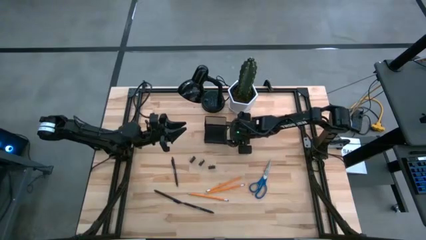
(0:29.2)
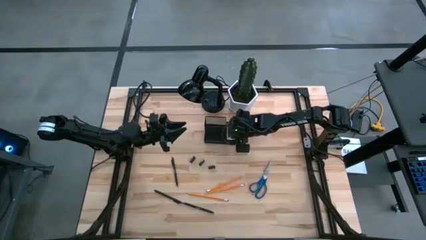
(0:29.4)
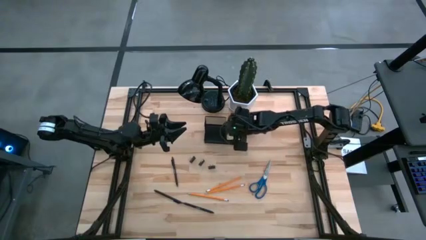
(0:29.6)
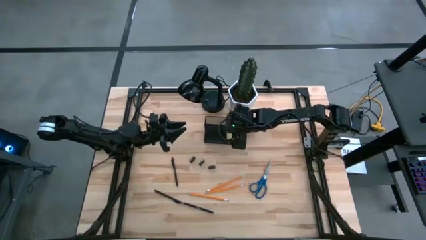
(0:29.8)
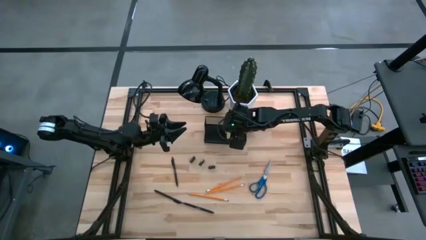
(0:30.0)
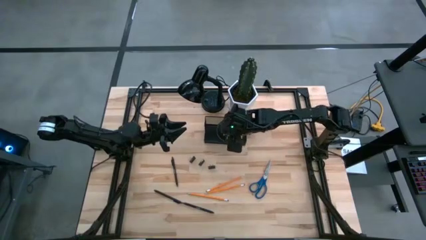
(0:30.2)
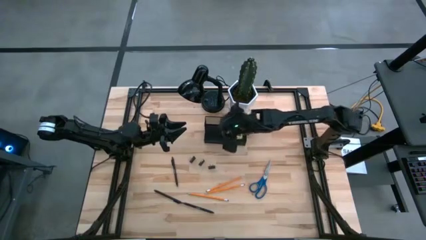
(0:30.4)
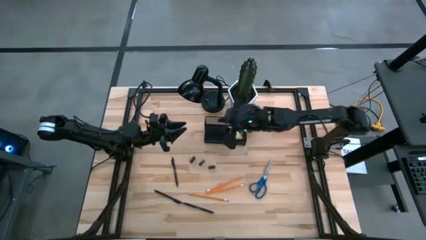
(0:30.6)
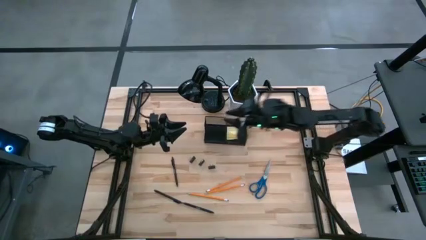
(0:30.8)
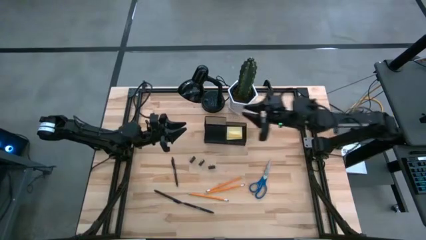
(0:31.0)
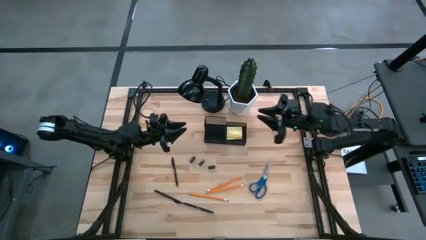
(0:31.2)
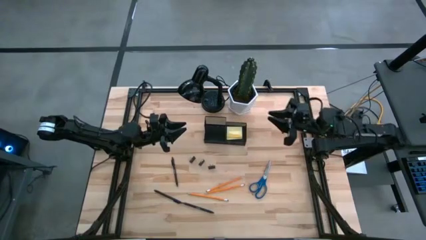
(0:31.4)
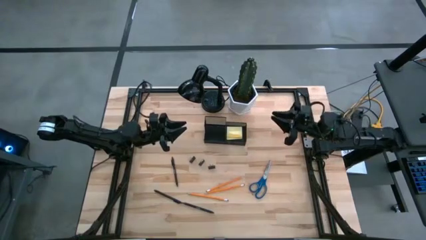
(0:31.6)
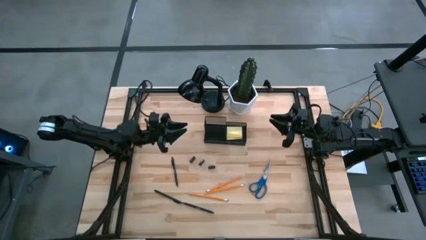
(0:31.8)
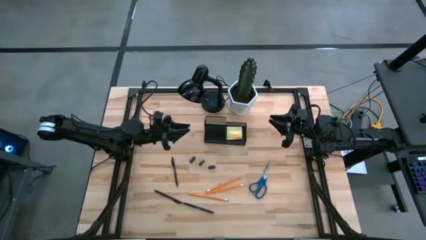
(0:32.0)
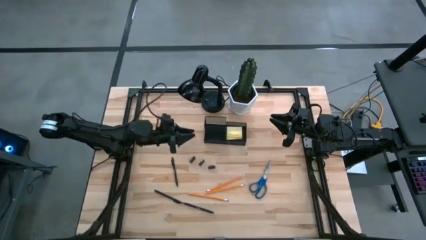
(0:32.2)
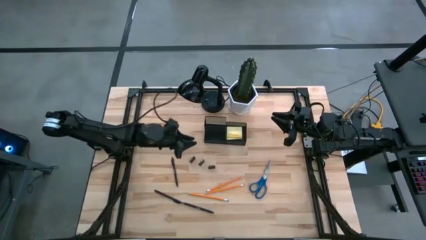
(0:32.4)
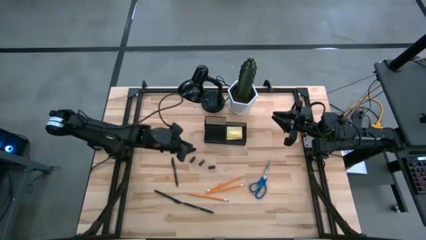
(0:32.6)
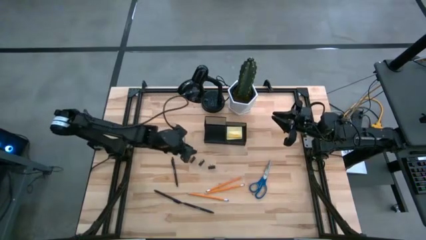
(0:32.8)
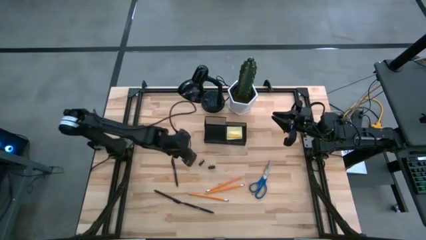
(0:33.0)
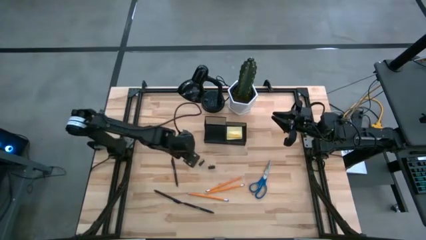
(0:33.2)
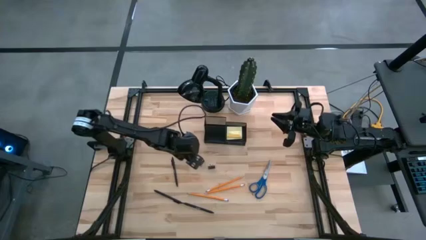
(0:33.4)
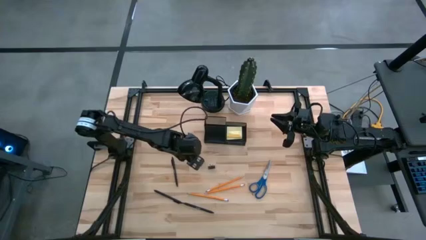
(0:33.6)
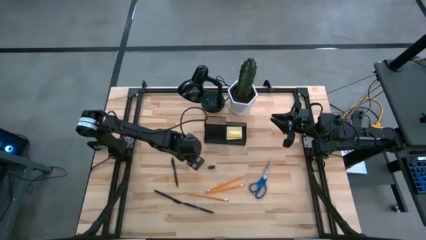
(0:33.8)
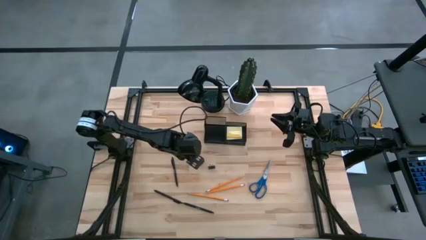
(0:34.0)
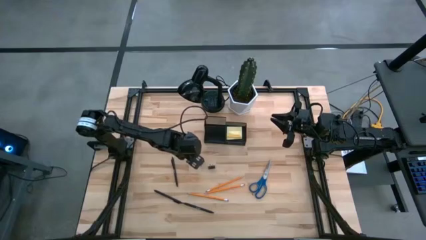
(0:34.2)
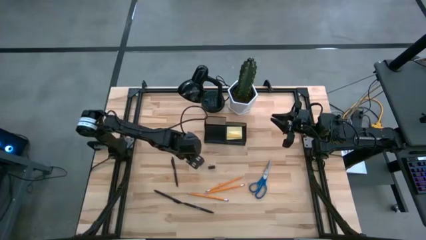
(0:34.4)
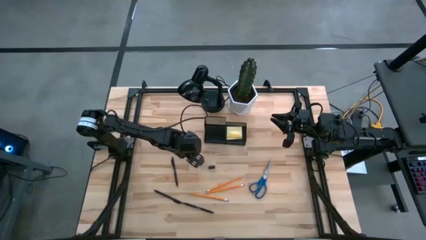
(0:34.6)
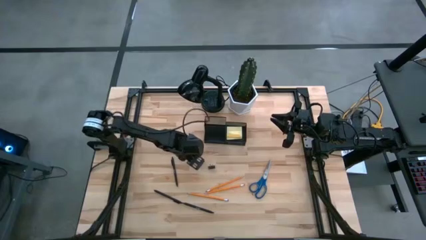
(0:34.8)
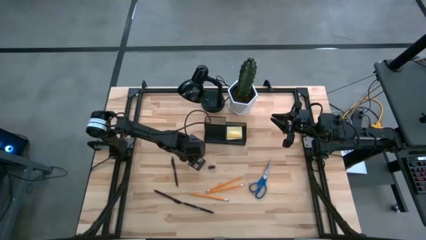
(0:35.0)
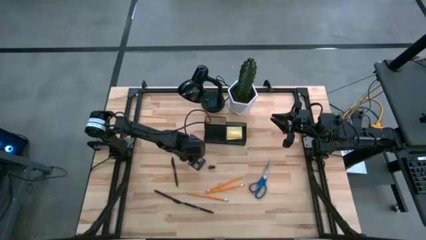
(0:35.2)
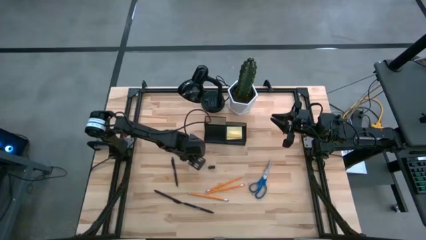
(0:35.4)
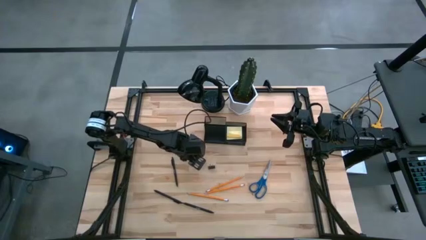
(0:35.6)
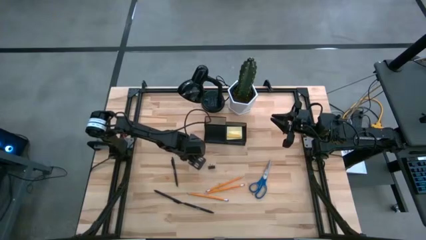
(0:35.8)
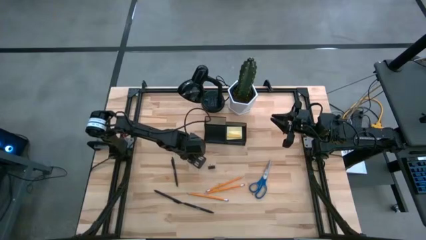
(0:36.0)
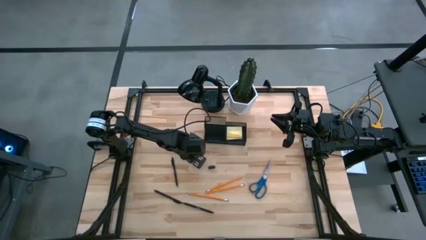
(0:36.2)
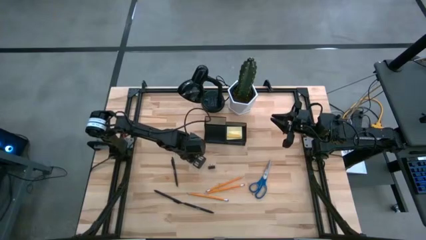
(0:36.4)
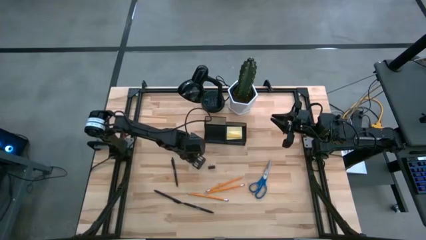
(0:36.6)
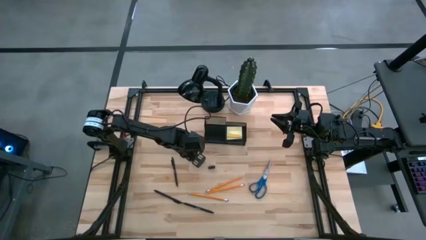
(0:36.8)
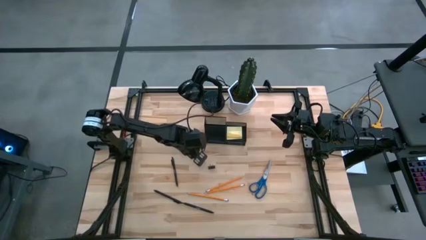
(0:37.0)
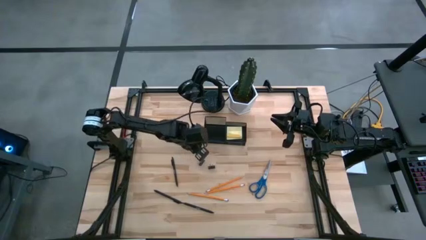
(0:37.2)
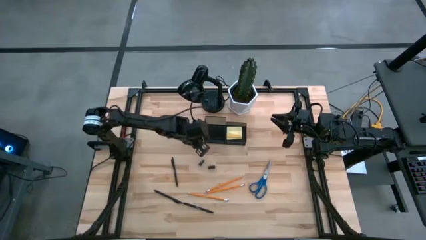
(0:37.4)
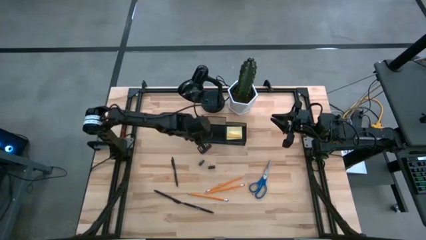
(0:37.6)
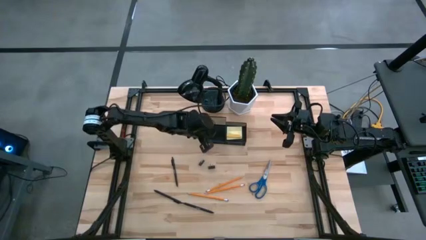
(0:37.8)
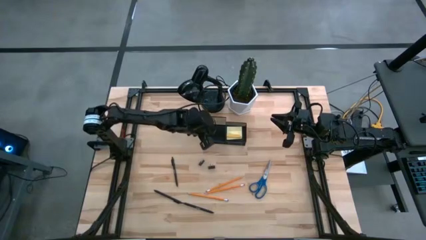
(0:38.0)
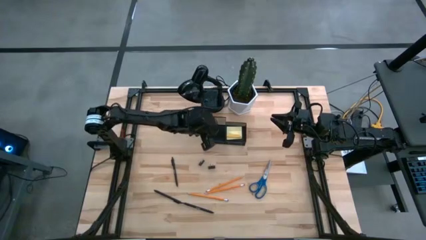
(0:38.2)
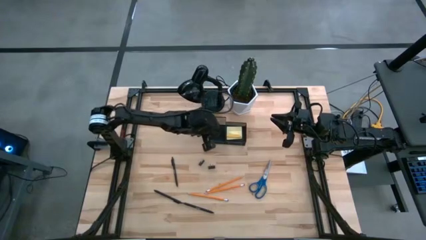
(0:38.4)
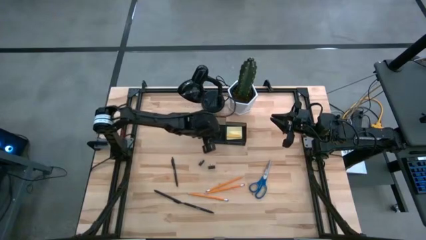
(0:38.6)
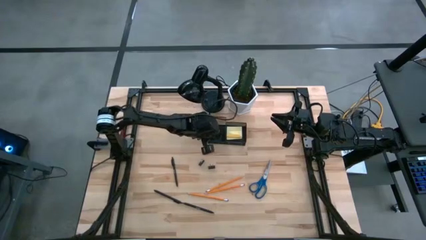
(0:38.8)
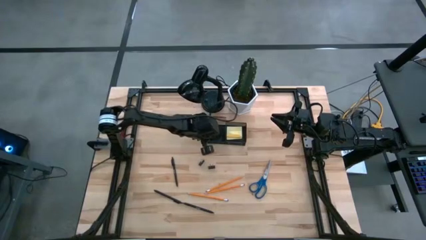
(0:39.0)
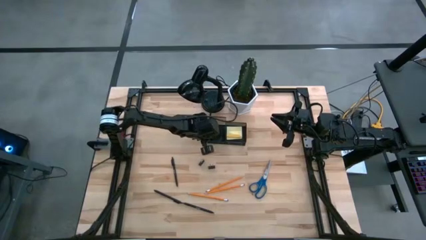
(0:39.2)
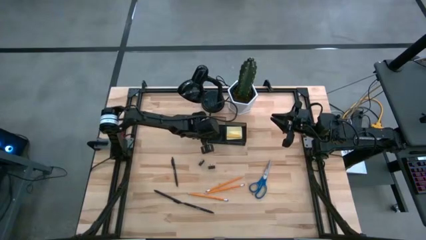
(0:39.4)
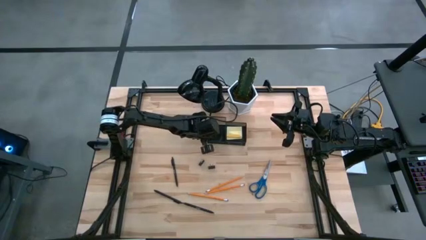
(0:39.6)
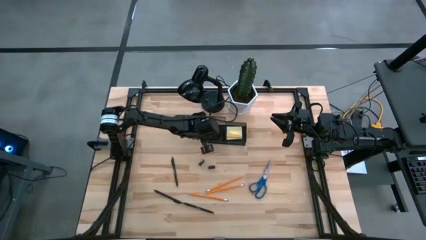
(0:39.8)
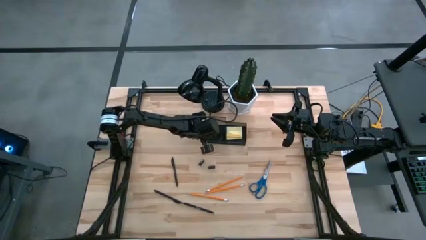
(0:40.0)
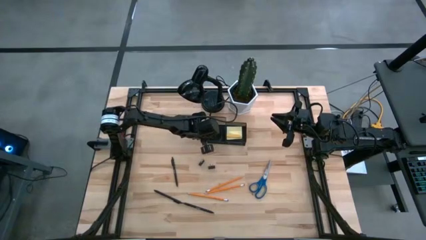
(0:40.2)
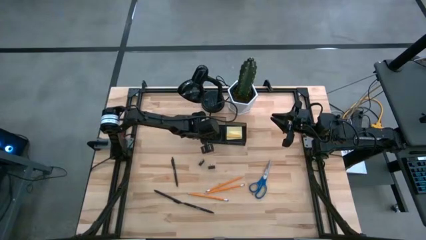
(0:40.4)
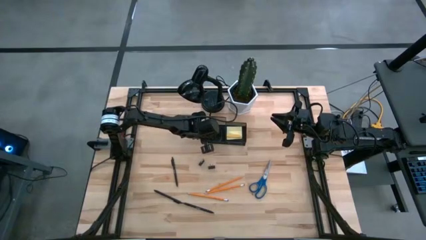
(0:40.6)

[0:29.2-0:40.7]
Task: Pick and place office supplies into organizer
Put the left black binder paper clip into the black desk organizer
